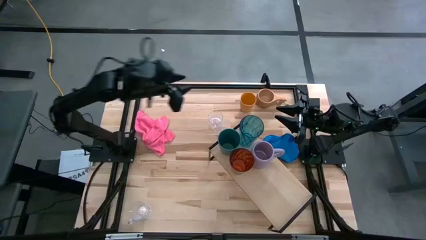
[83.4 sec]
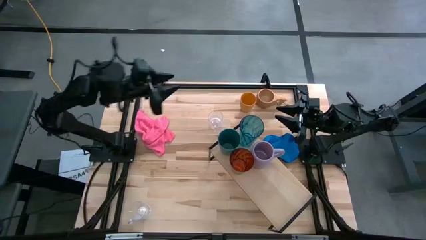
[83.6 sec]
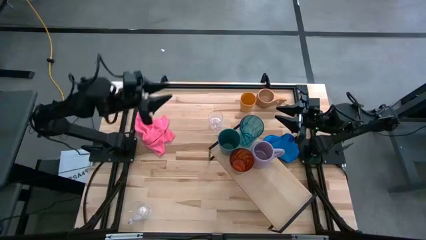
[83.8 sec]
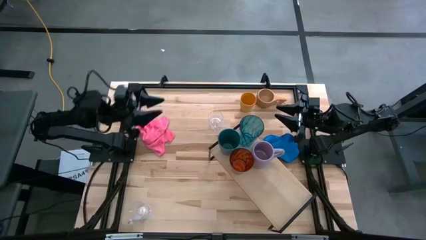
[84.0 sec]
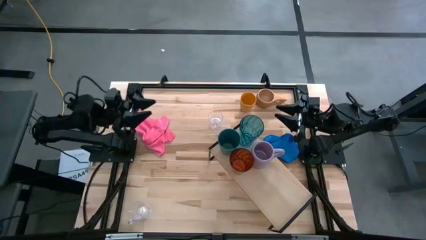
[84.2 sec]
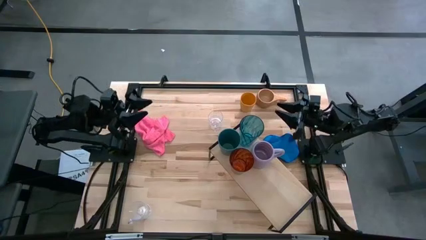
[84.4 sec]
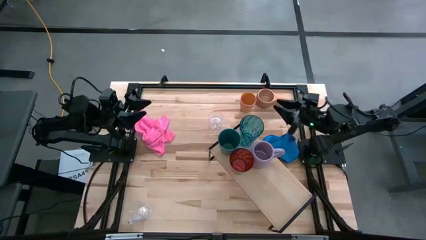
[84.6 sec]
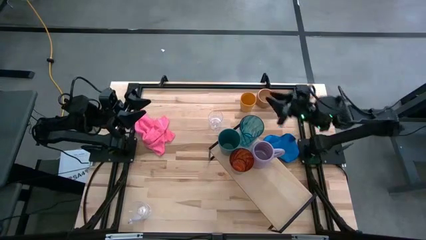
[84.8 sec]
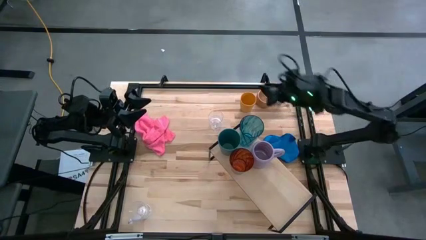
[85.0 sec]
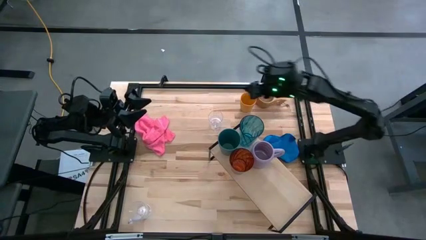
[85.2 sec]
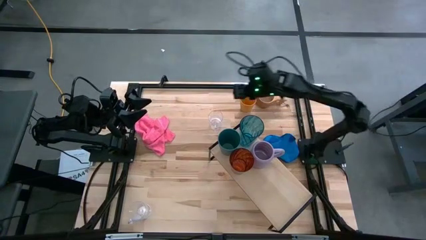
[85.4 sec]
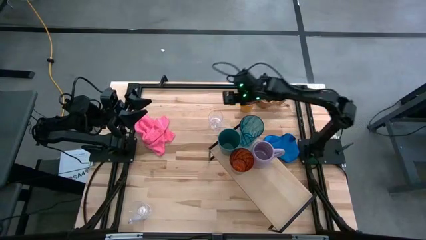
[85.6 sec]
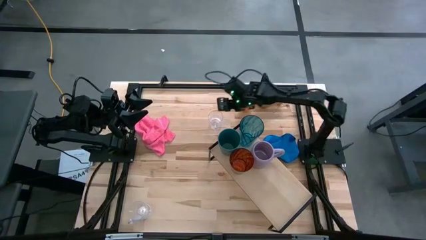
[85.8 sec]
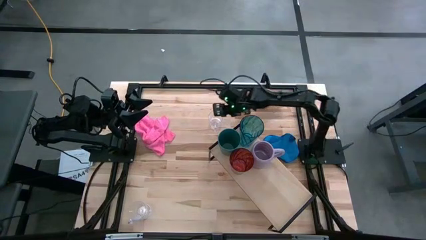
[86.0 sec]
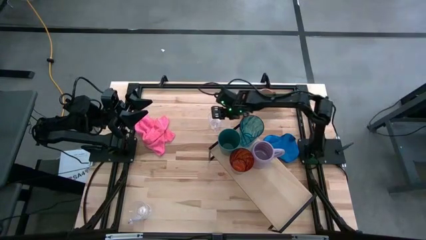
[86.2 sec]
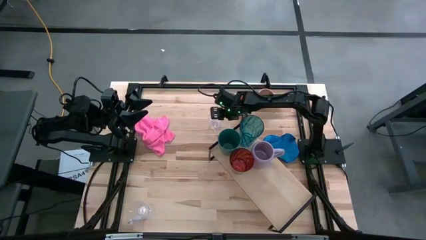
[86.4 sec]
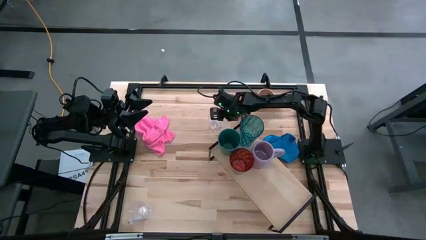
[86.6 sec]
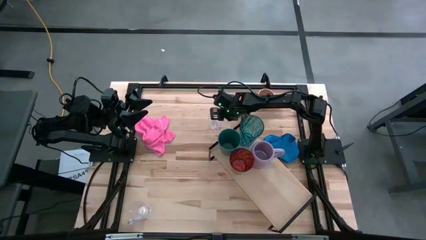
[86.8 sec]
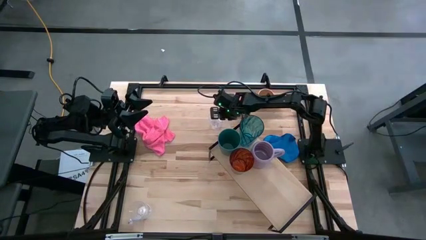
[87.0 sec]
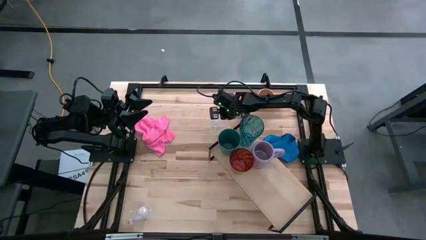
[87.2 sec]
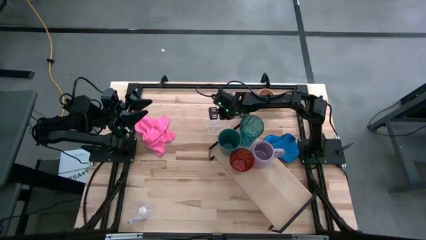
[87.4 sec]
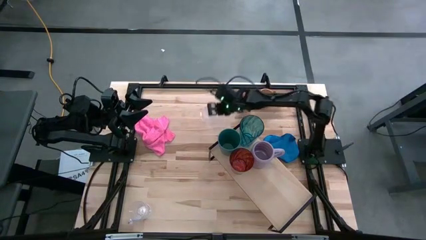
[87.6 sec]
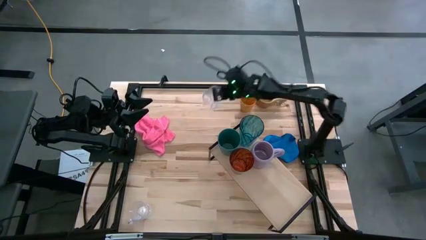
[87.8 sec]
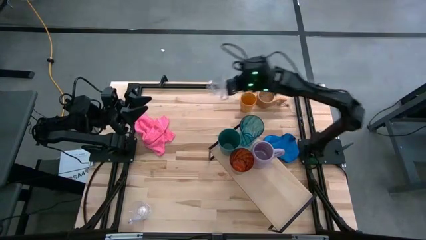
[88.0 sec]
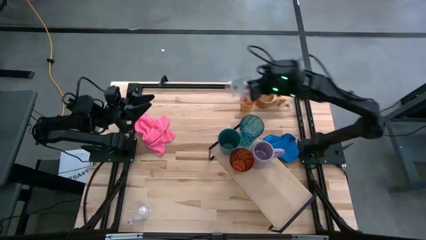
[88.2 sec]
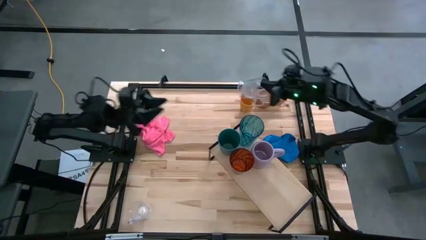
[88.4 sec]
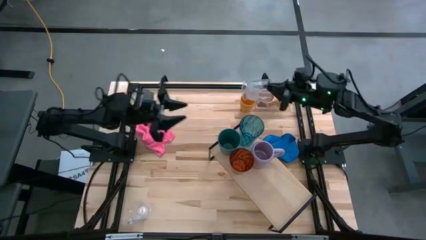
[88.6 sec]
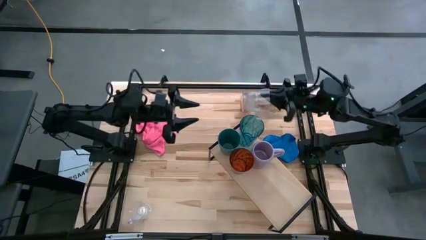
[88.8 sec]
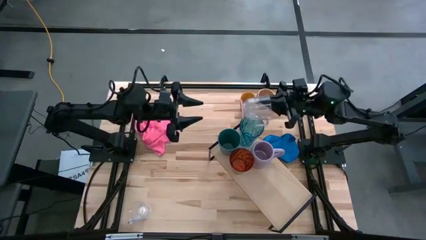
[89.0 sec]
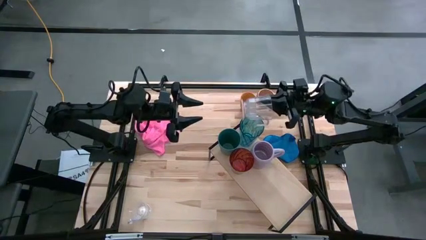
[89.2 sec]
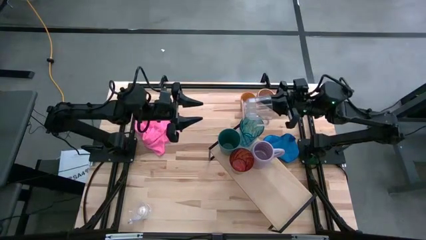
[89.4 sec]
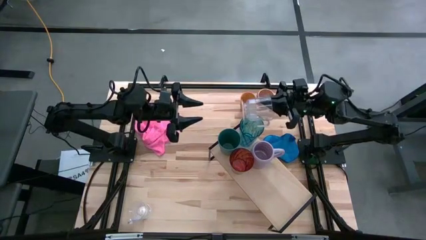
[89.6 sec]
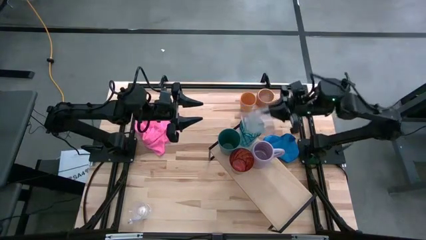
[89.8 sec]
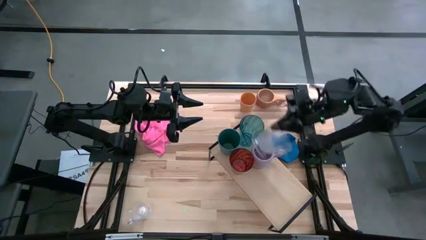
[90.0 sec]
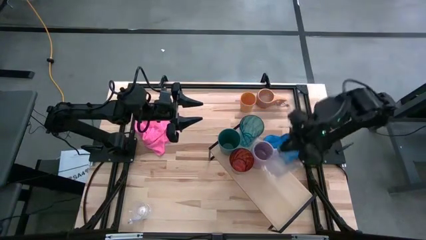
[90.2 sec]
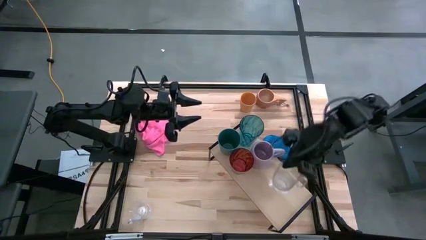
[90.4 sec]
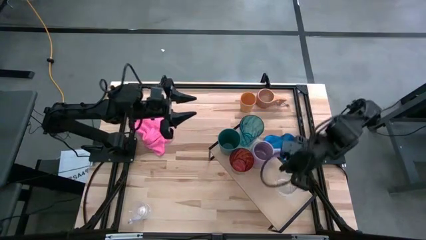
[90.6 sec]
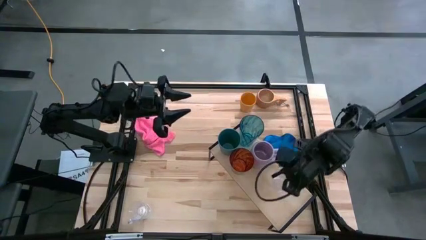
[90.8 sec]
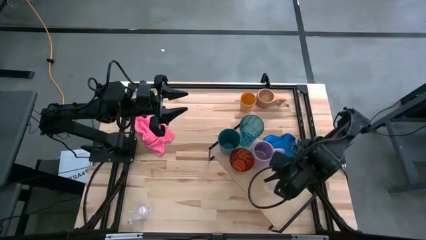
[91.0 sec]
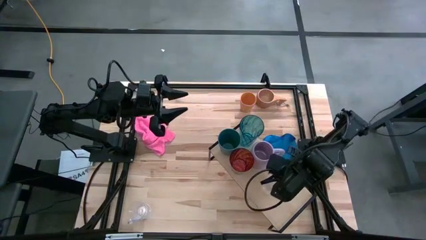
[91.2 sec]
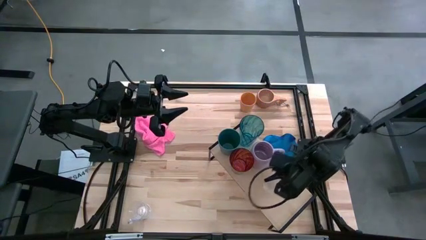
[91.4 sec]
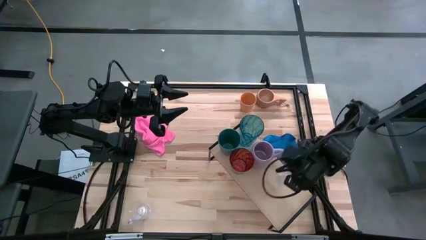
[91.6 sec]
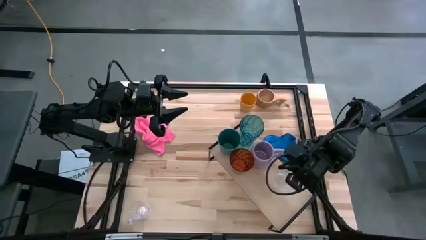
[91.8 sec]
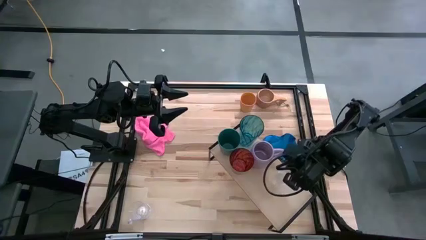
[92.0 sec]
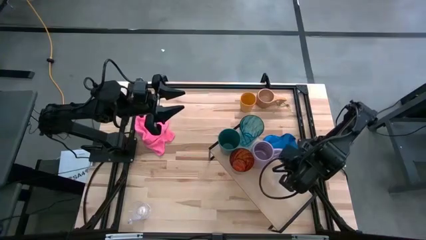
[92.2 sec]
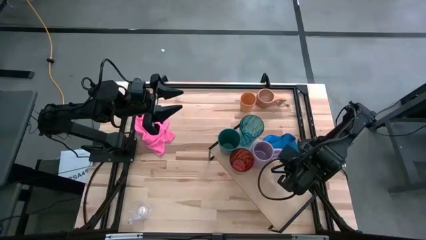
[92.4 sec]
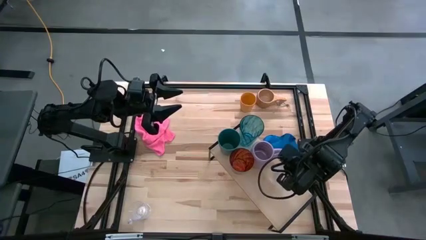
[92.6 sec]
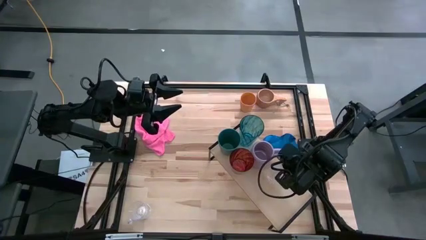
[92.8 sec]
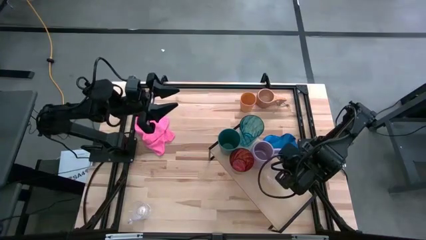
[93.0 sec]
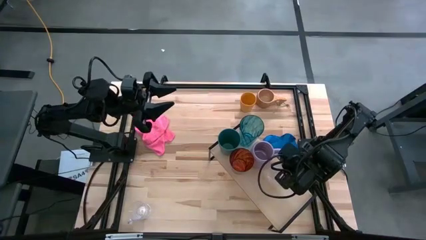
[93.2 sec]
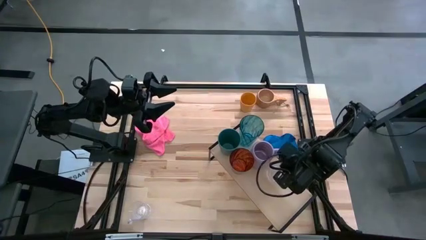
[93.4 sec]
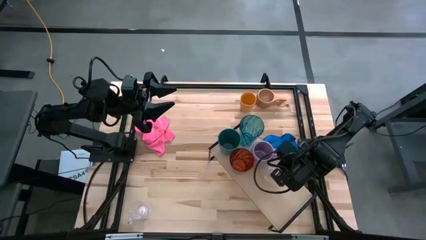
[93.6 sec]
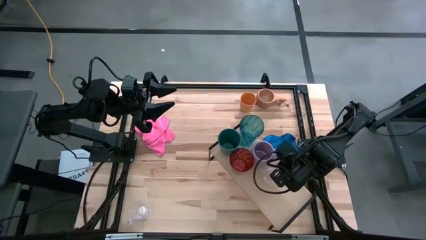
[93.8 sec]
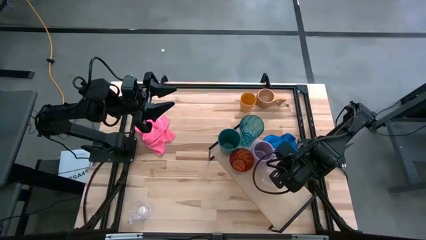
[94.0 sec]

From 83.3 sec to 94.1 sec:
Task: Stack small to large cups/mugs on shelf
Put the top transparent mug on the shelf
